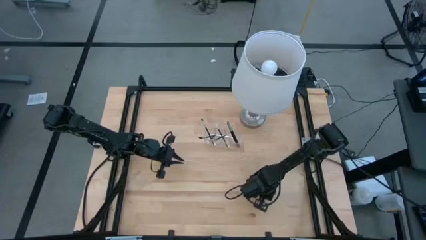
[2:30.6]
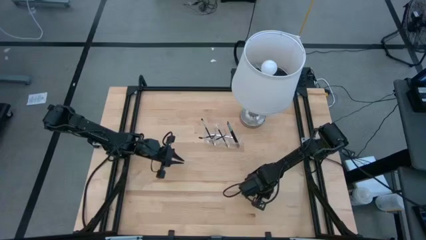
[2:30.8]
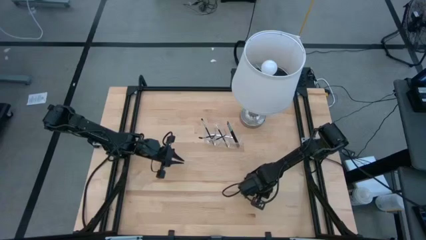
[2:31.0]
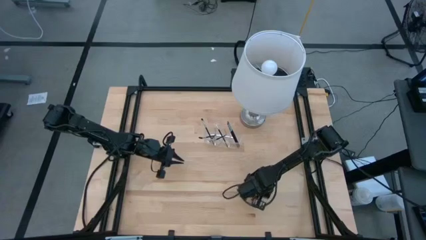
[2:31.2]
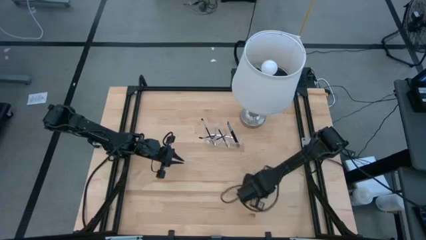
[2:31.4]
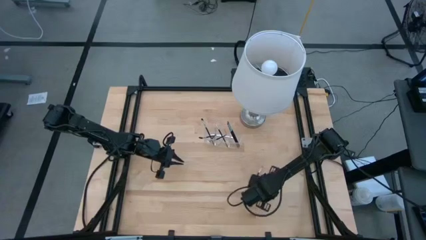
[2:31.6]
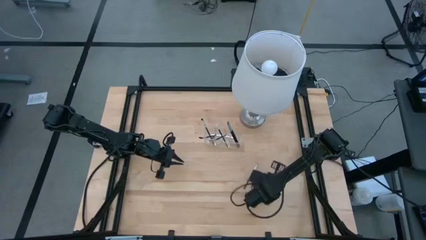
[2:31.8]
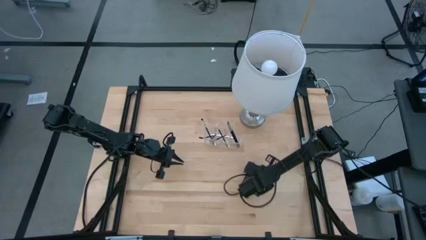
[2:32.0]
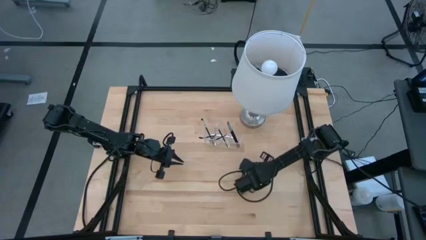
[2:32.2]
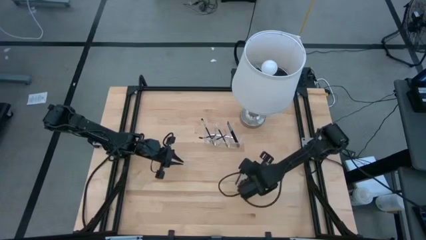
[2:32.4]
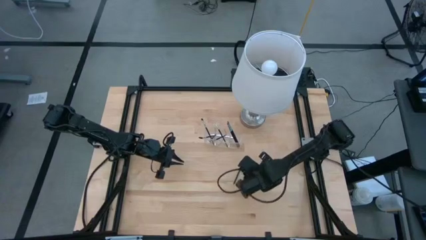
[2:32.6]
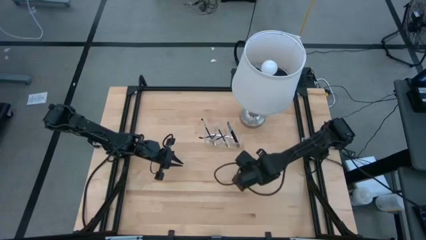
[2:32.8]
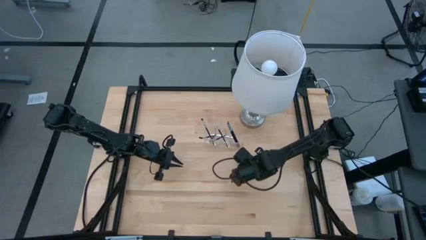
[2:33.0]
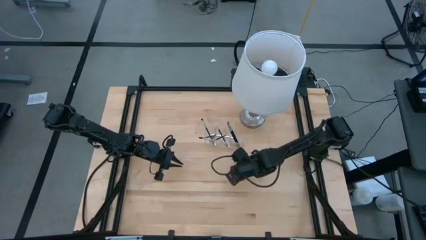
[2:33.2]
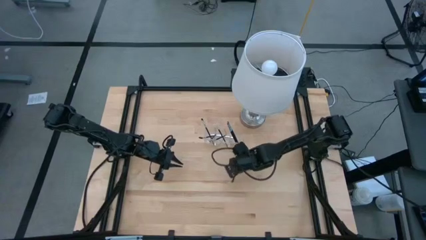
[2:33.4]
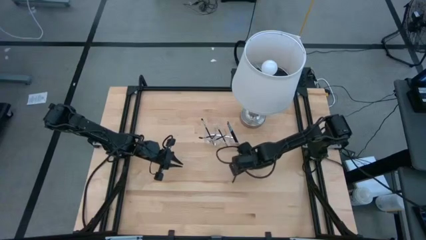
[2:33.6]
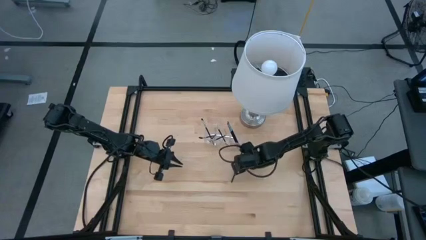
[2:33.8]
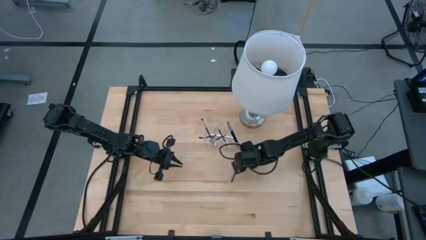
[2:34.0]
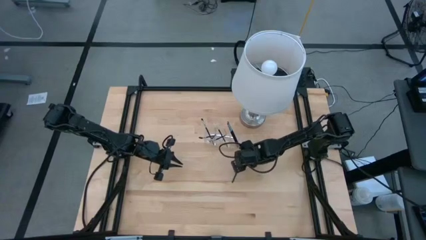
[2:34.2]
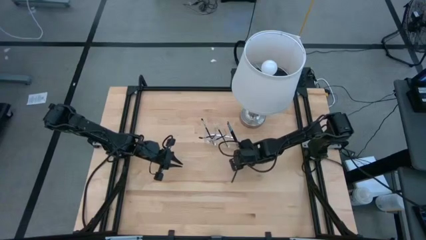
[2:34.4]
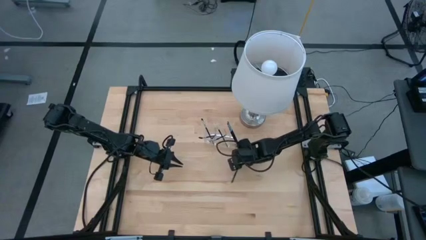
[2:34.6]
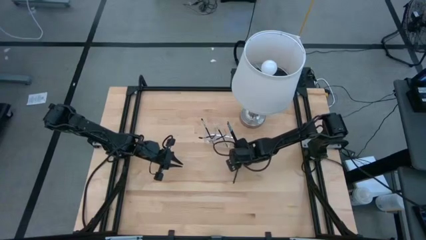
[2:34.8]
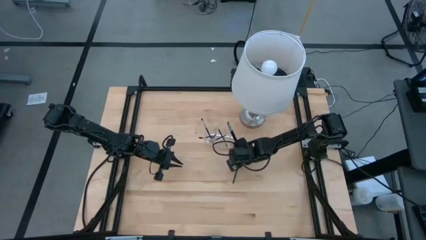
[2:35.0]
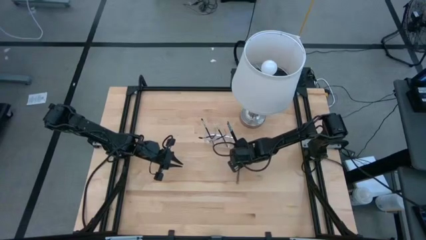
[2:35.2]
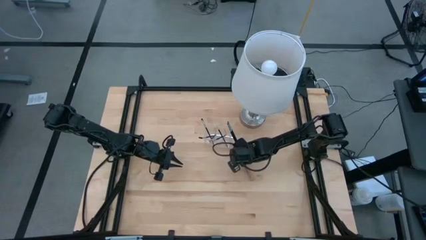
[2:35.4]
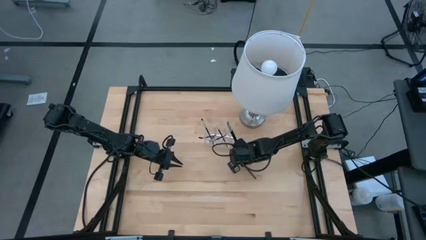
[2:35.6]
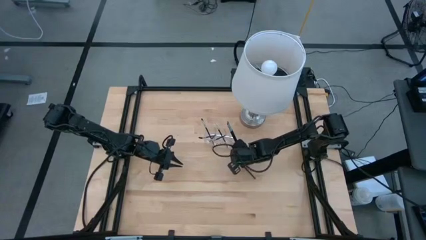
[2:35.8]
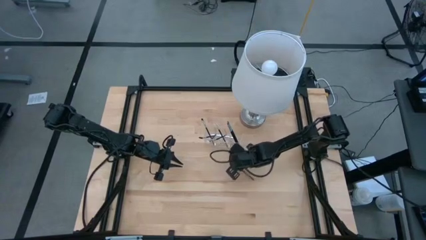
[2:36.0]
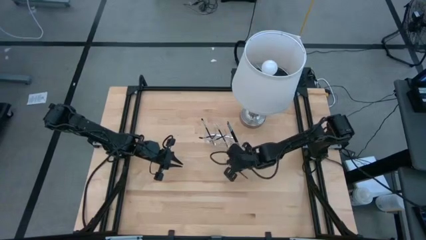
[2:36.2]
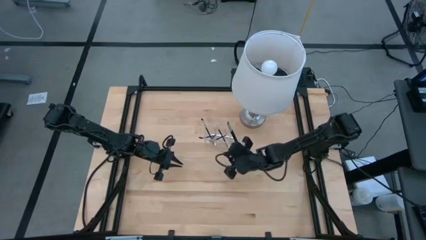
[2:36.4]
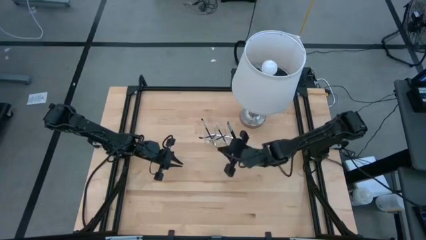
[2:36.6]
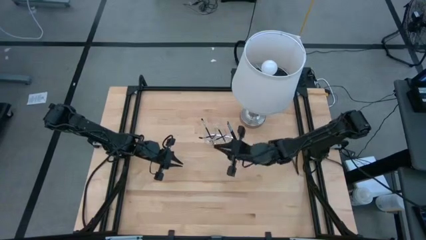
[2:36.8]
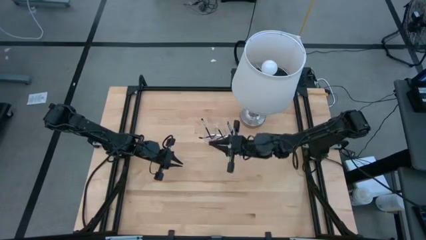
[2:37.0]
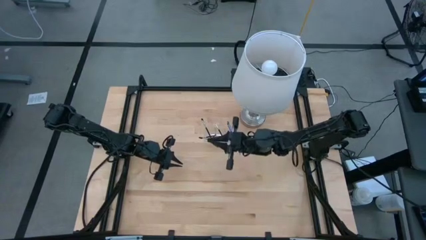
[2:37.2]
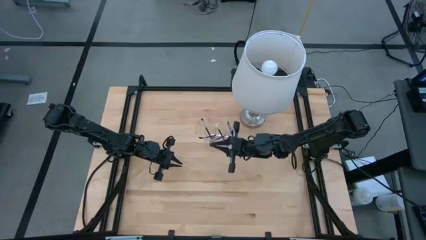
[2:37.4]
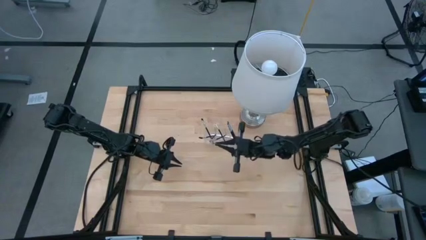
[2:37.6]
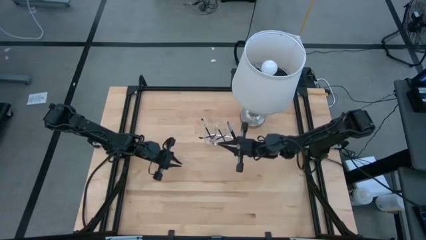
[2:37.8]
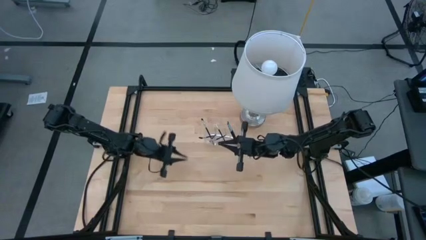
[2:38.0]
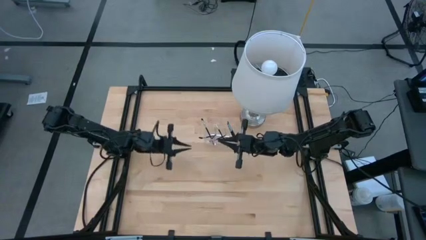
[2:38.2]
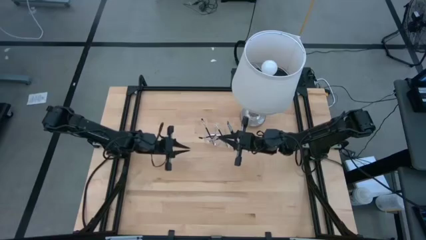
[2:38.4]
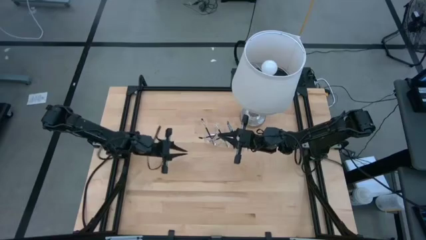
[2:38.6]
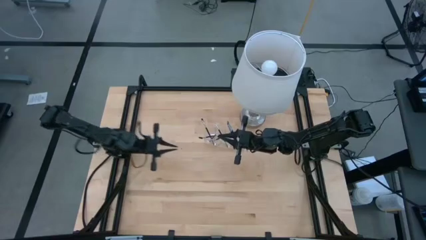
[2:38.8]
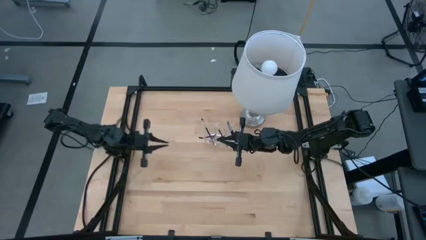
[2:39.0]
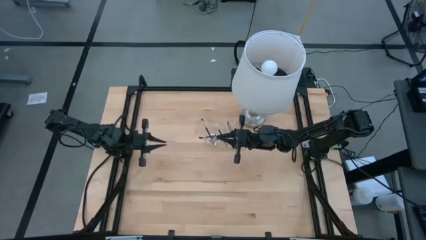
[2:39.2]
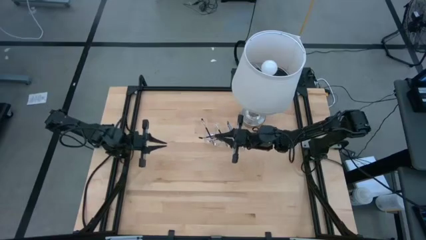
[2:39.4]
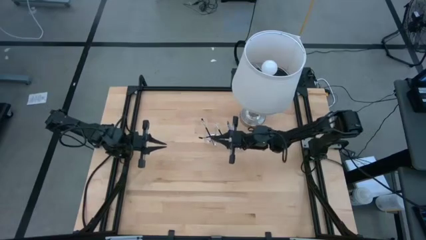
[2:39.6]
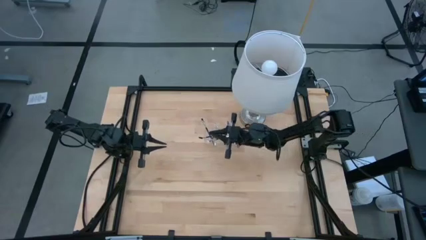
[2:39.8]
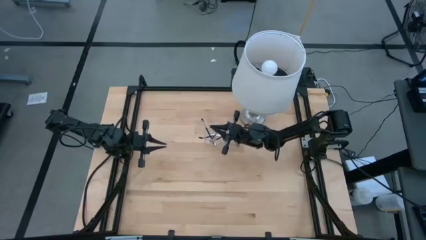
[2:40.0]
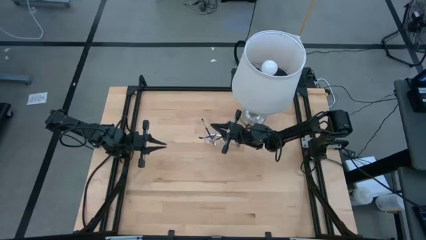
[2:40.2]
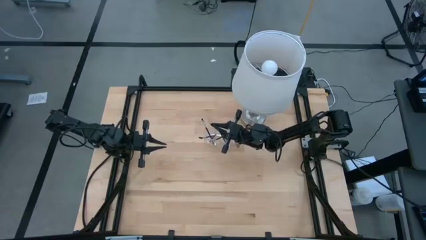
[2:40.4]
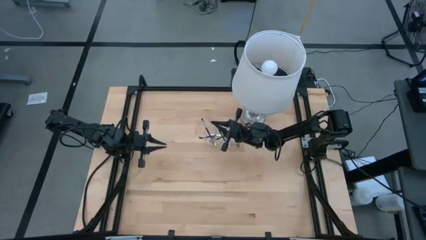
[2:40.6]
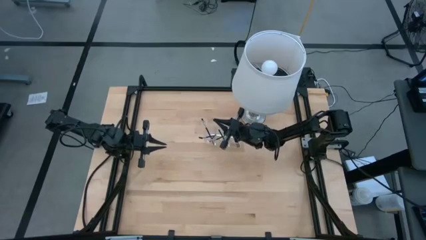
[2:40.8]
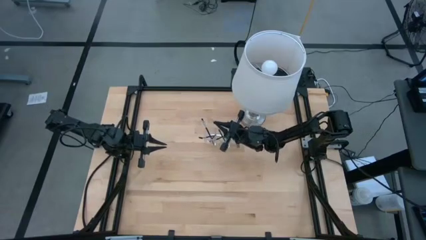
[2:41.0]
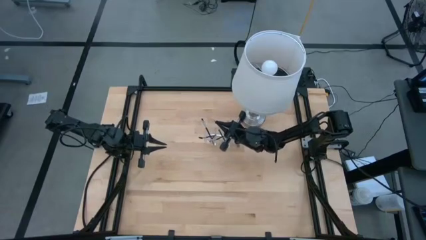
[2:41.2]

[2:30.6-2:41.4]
Task: Pick & Place Makeup Brushes
Put the black eyeshadow brush into the transparent organizer

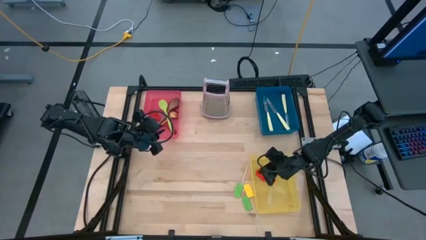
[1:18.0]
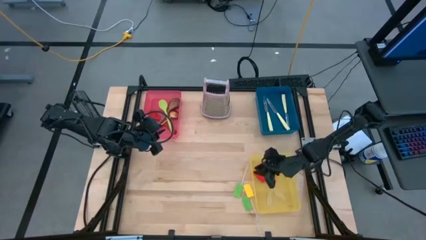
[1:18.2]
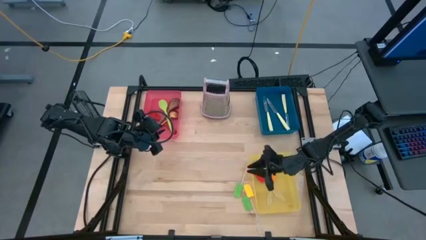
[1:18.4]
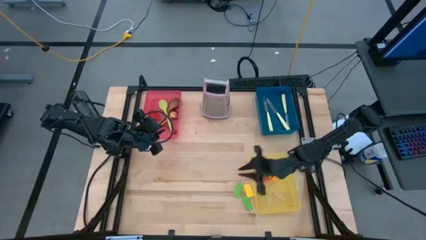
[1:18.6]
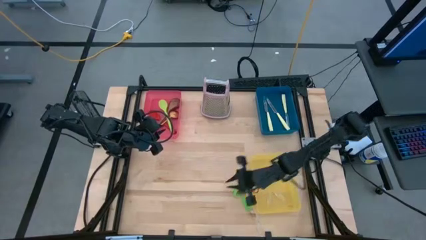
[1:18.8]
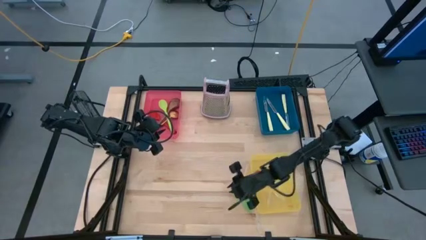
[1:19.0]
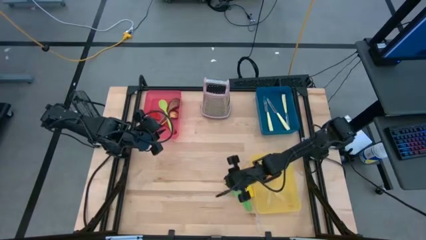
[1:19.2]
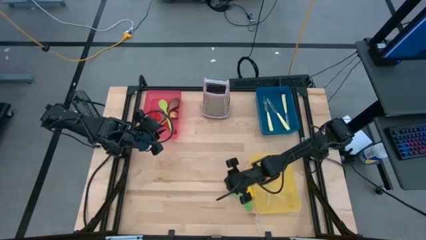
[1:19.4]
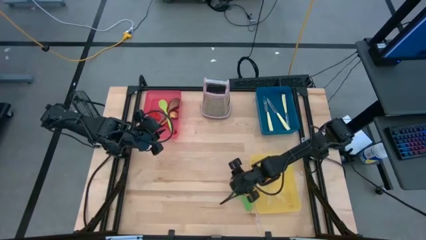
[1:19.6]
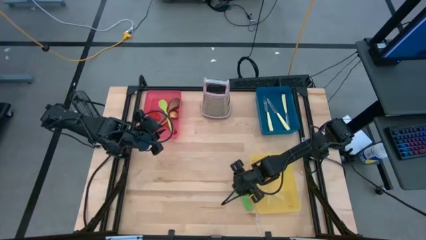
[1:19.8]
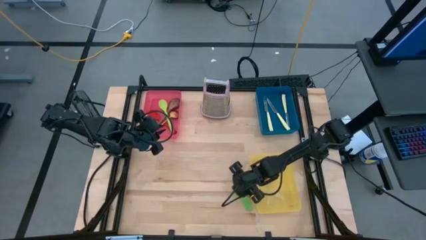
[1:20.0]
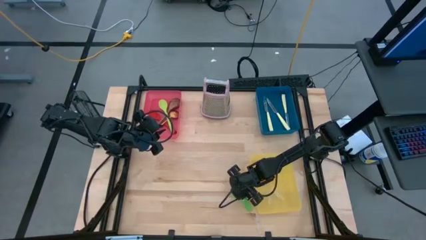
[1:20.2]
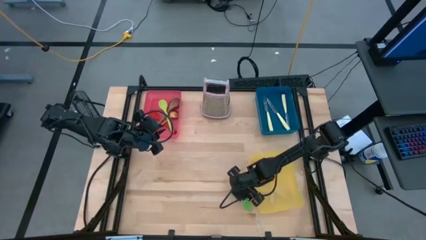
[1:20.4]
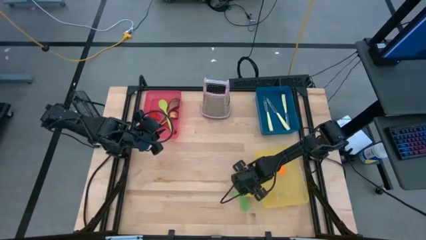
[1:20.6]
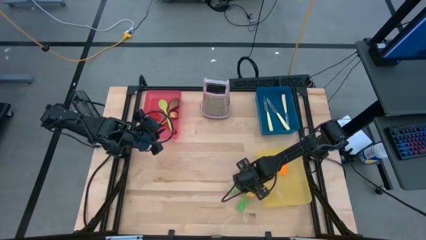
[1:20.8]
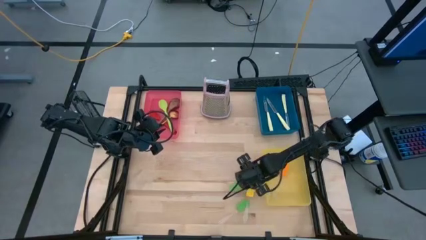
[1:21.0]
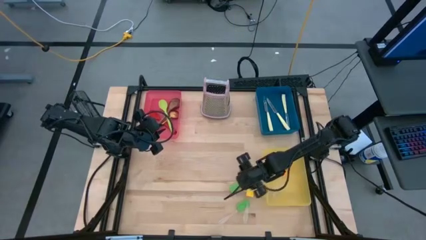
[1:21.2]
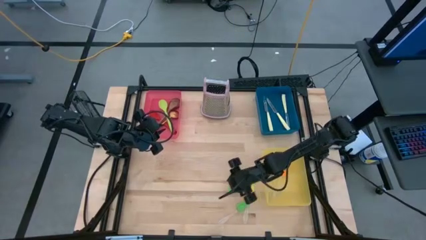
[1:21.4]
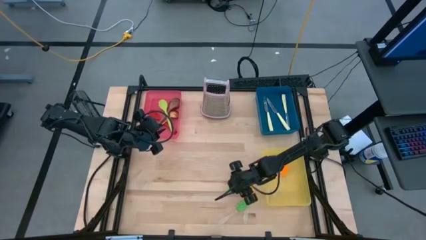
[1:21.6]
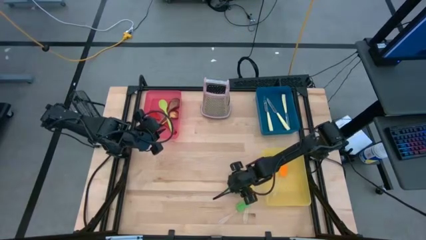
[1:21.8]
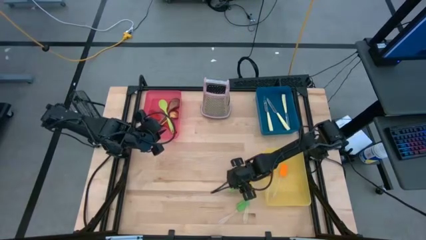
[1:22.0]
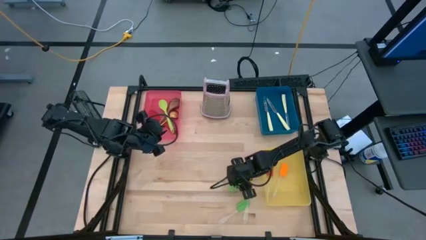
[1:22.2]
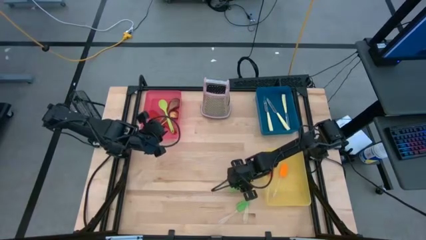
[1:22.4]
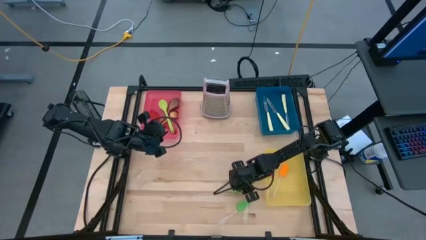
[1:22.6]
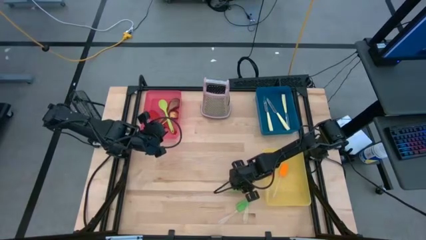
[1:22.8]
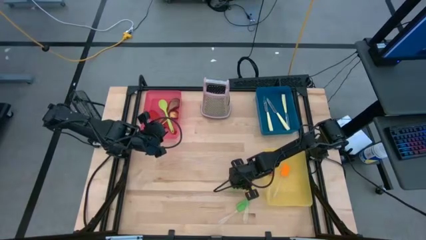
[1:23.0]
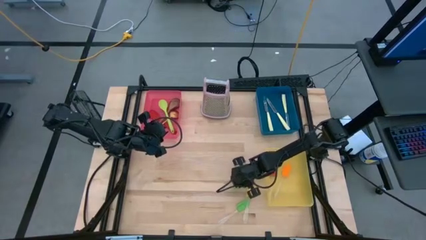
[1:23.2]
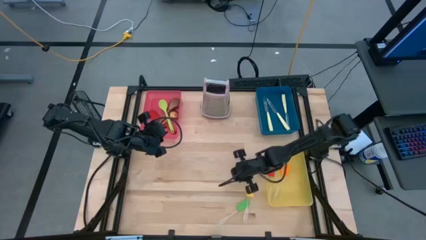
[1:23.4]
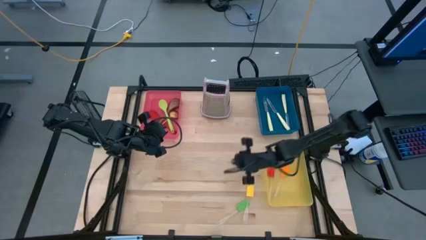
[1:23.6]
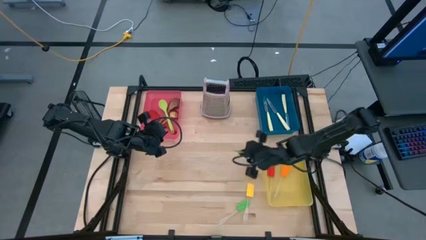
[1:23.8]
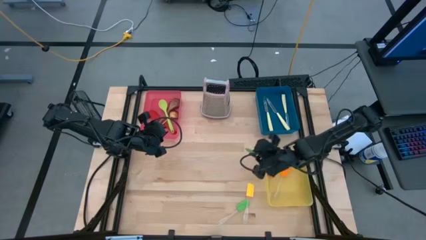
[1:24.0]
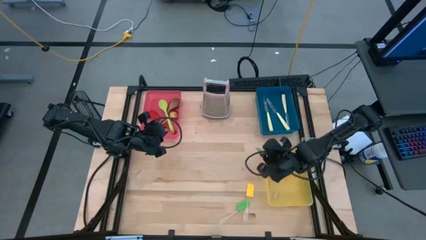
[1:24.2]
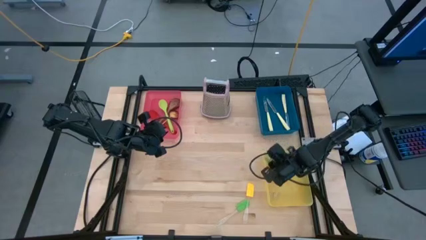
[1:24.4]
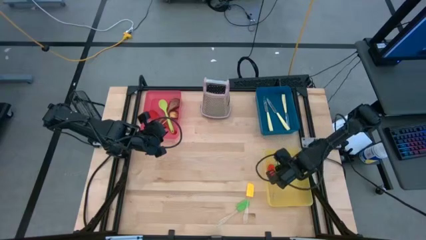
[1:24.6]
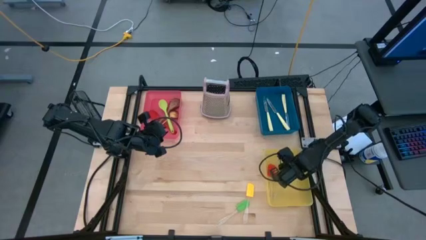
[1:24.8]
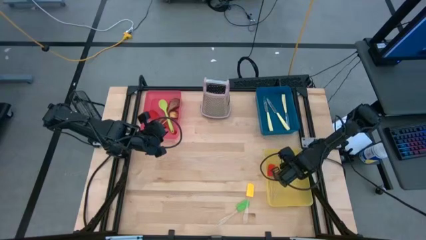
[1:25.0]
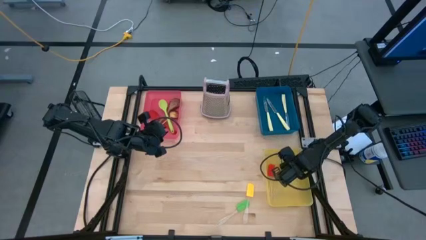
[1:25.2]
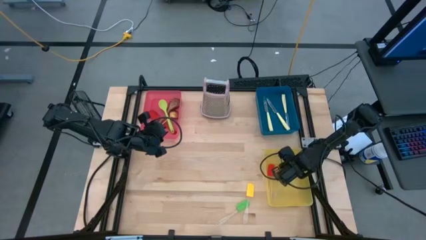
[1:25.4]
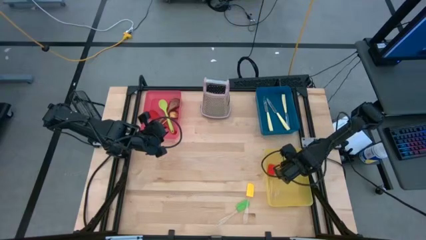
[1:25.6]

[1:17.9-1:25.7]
Task: Pick & Place Kitchen Items
Put the top green spatula into the yellow bin
